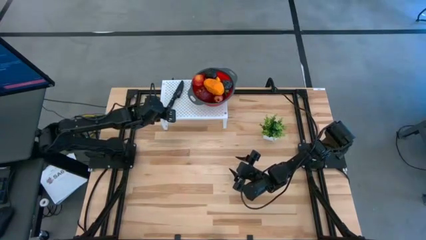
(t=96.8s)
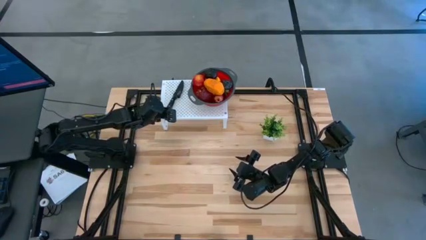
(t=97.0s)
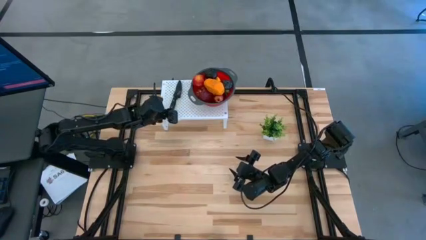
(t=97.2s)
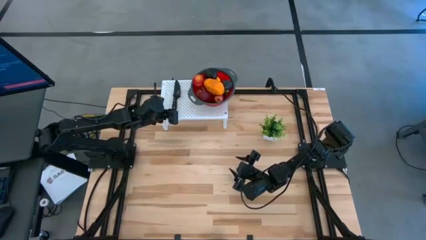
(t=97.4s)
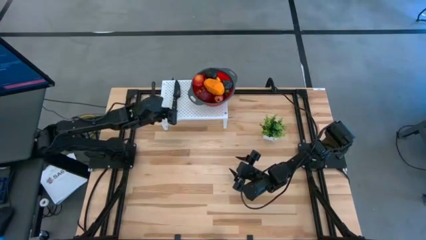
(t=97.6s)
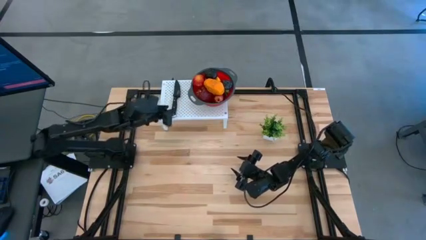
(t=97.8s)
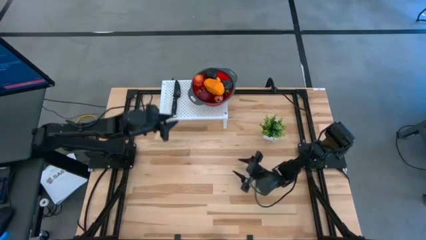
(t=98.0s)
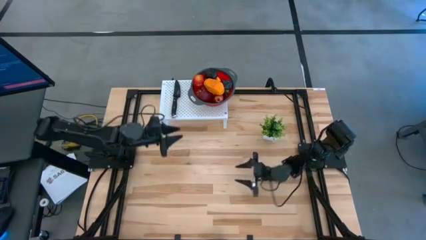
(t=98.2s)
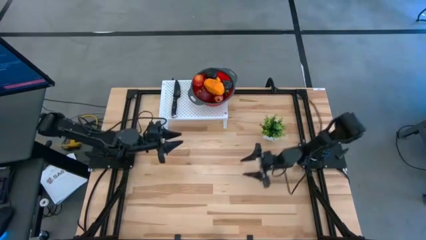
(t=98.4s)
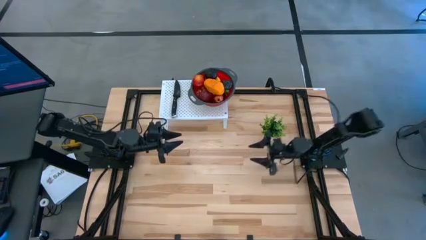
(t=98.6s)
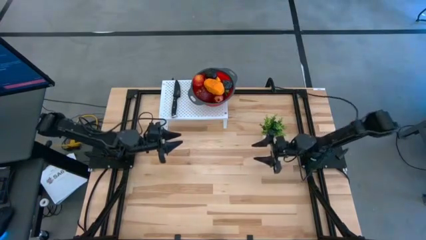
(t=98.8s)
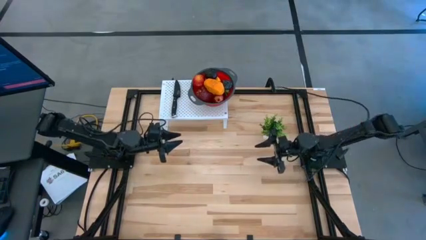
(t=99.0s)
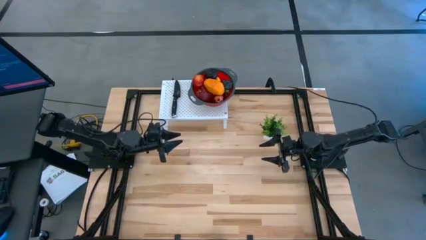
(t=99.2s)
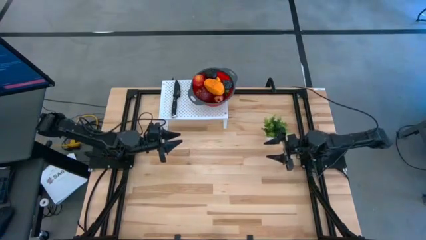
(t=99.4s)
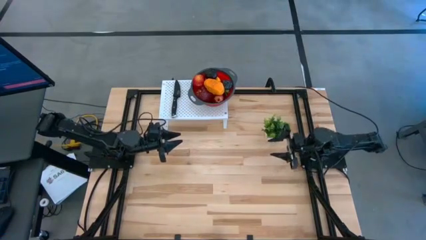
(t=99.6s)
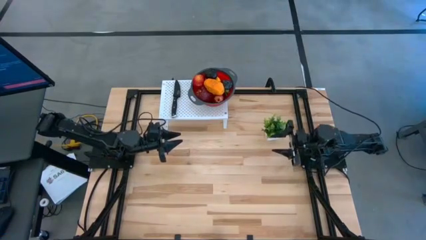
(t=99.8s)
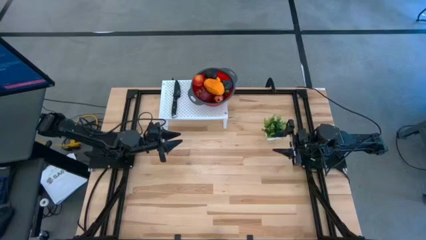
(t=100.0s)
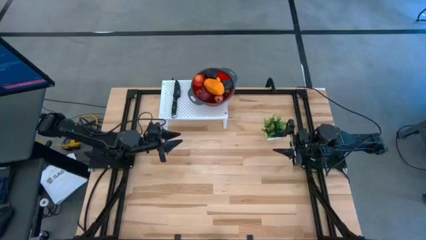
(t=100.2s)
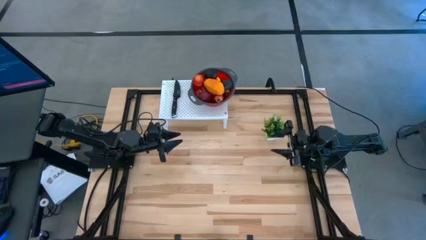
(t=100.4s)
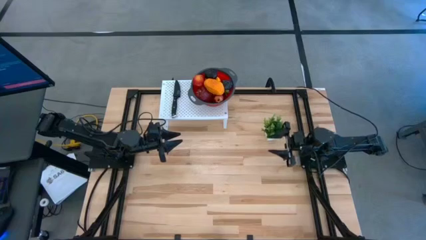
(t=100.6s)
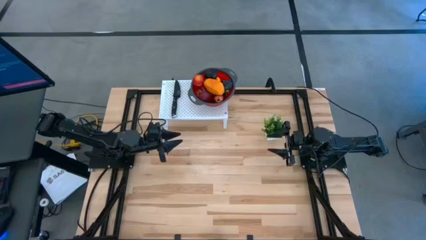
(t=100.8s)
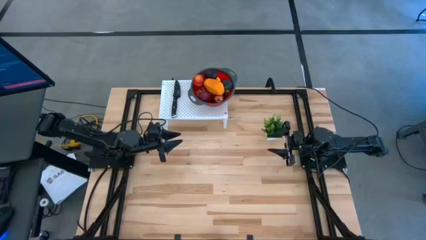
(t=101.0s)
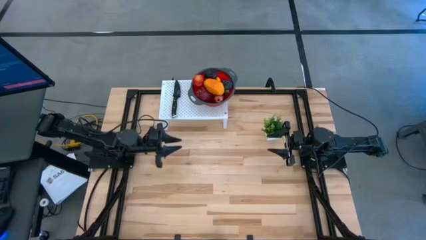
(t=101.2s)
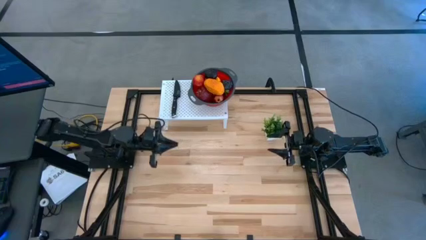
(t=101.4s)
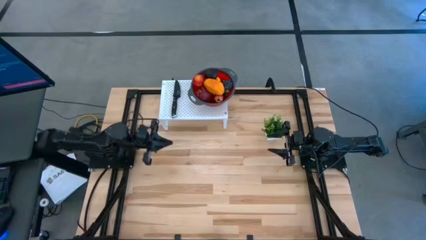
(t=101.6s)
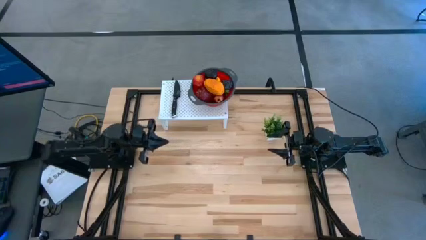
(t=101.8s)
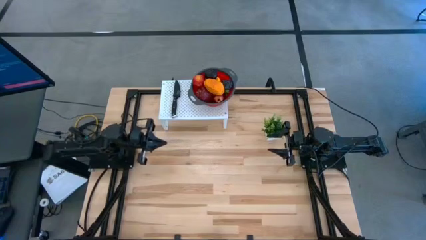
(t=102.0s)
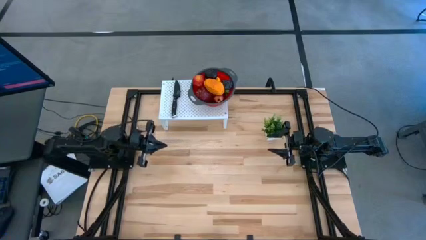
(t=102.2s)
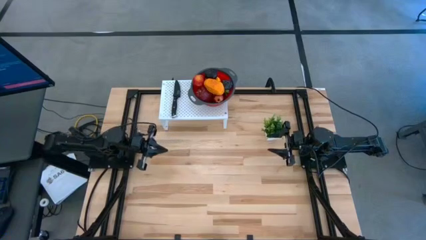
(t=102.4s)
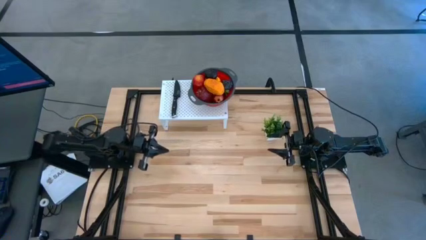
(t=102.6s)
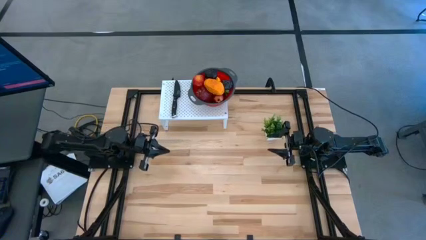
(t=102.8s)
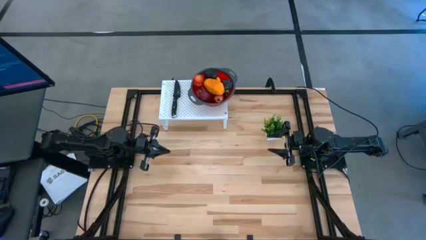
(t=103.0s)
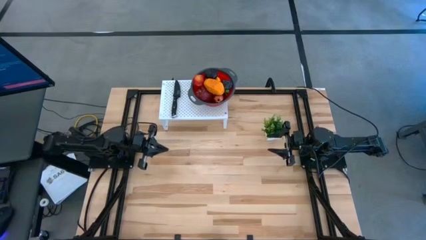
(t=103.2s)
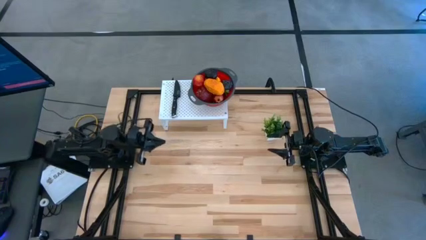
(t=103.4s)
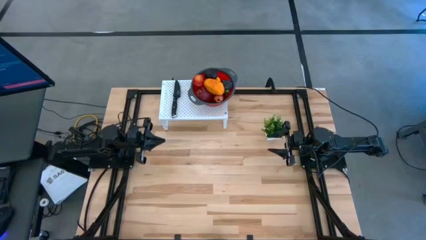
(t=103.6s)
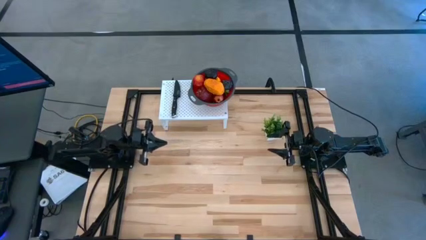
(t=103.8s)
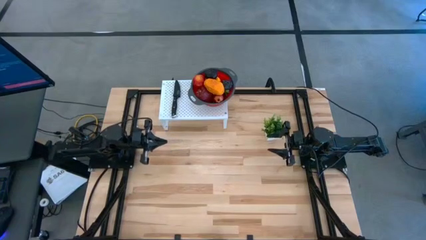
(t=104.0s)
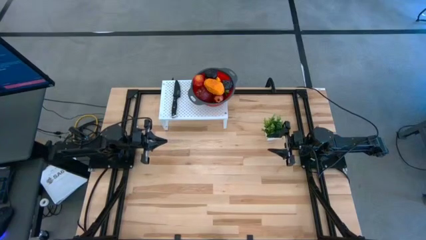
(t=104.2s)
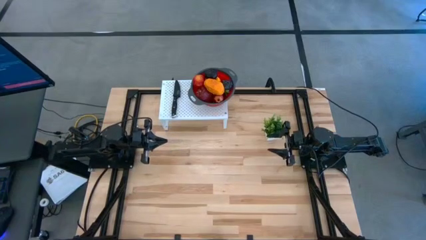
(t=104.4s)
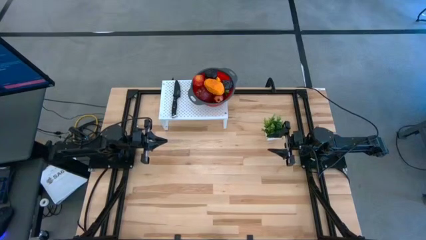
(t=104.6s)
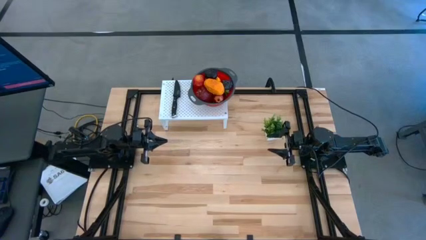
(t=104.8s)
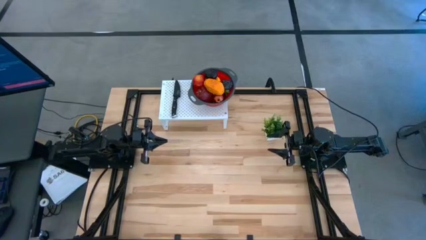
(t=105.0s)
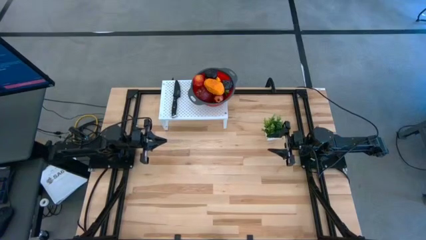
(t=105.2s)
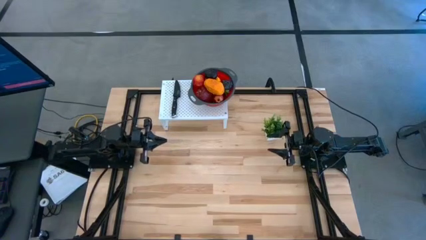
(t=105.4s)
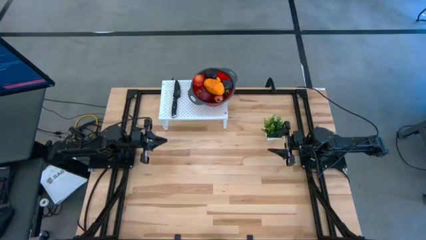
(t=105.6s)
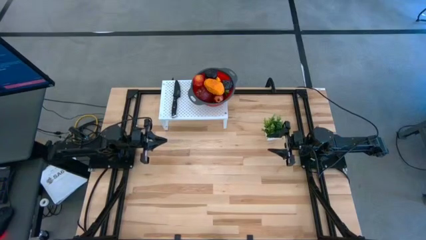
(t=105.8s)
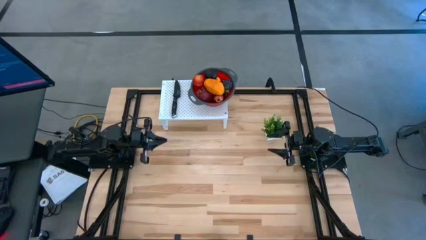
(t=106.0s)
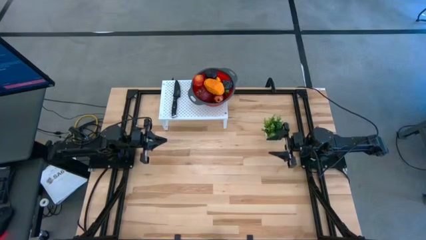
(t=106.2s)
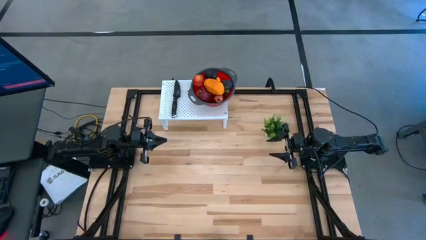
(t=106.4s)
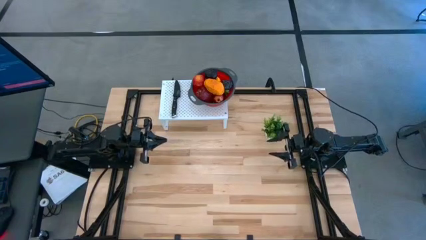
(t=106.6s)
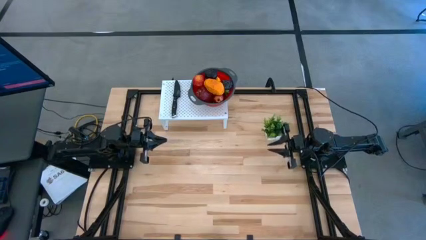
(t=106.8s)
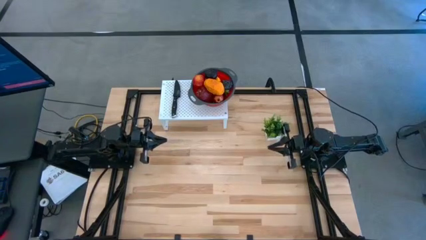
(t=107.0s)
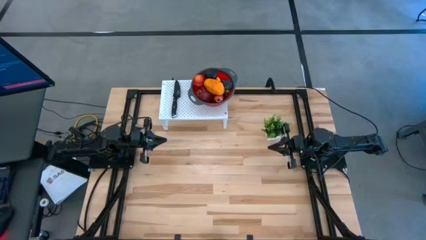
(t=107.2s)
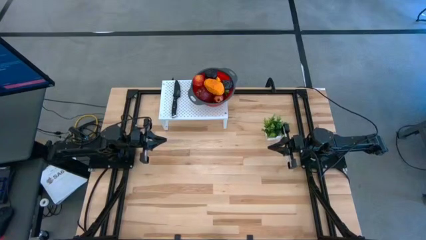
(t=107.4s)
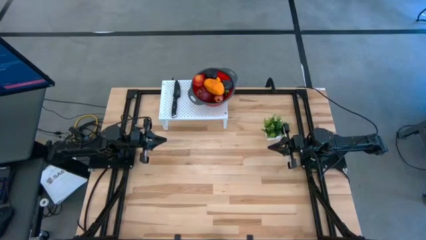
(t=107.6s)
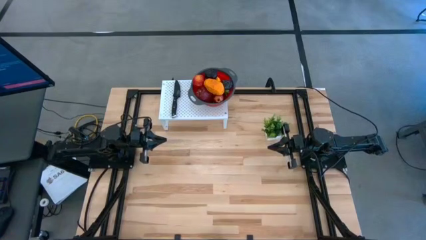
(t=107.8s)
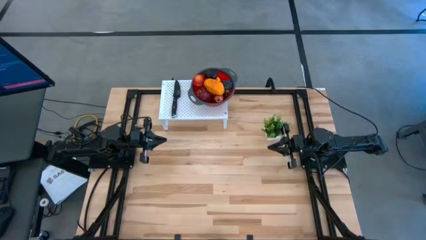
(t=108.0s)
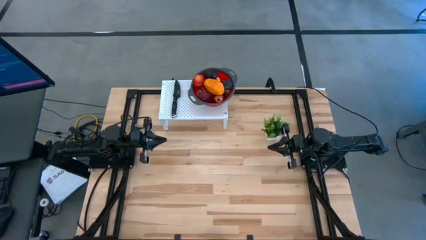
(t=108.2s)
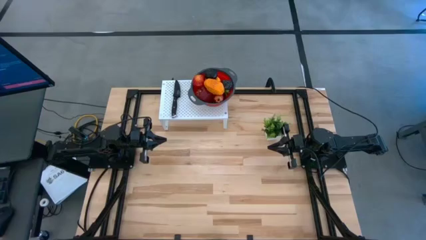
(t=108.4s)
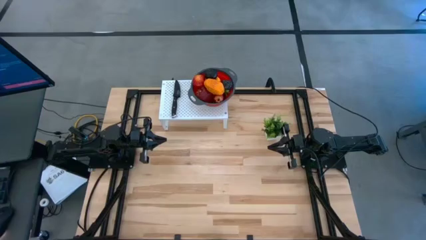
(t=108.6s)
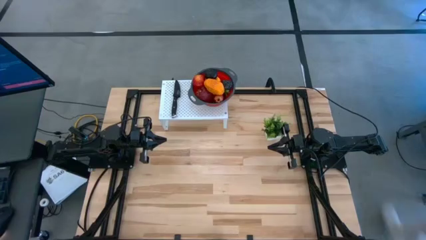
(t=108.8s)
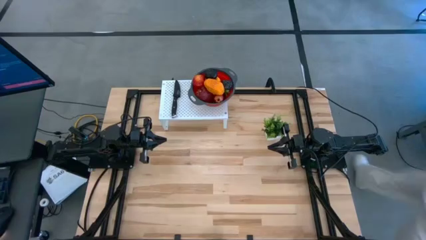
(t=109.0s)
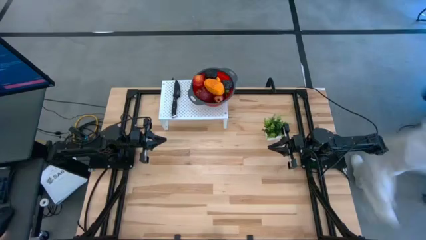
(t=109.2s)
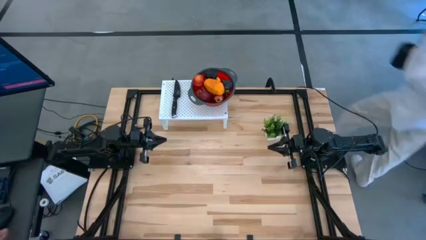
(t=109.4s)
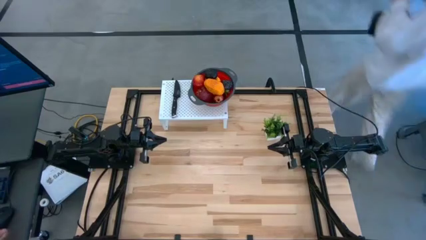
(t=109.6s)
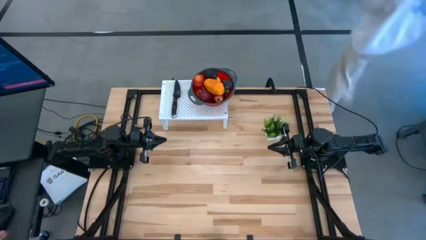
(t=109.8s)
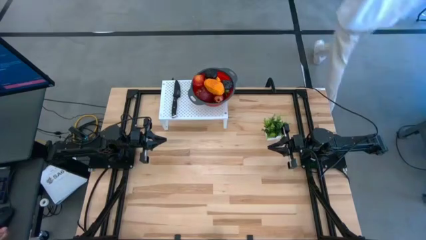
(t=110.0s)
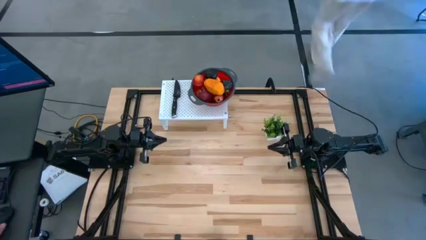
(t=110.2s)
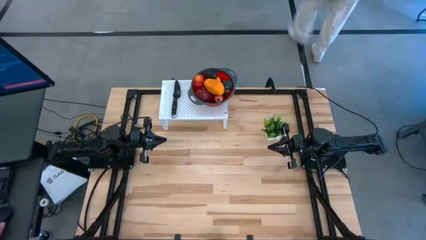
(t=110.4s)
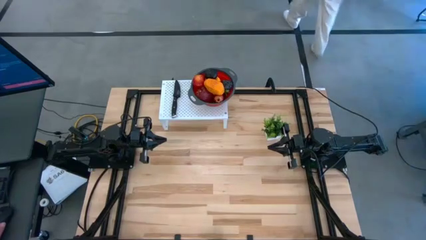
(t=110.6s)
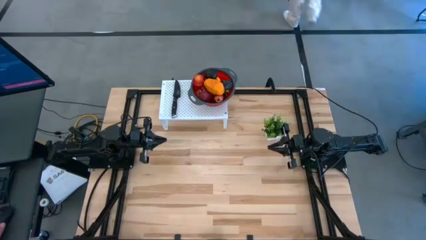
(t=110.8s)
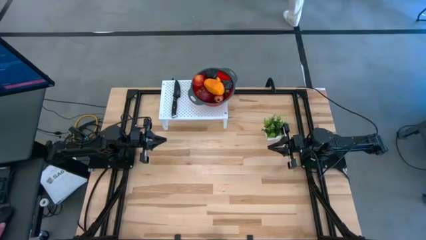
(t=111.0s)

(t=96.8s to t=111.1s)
Task: Pick & Place Fruit
Return to Home Position

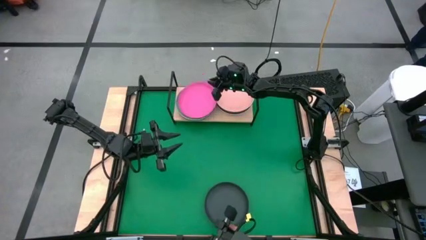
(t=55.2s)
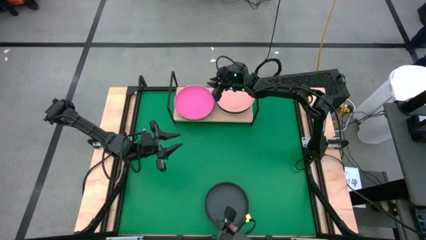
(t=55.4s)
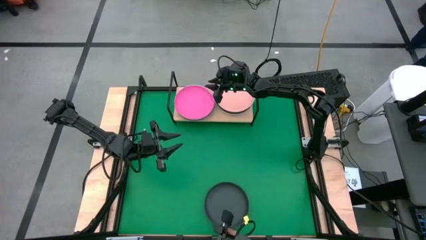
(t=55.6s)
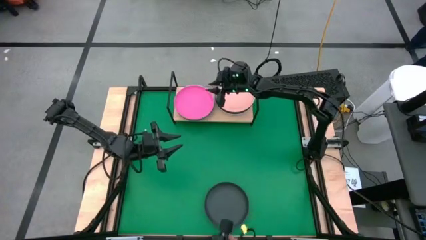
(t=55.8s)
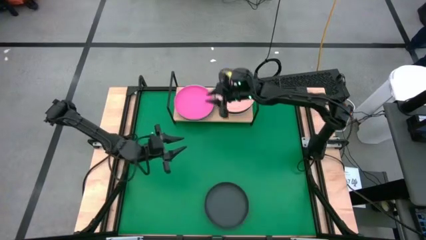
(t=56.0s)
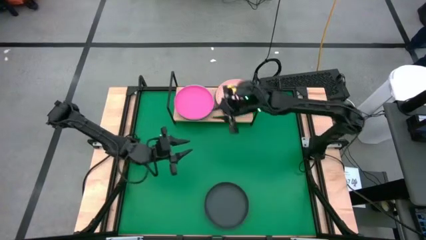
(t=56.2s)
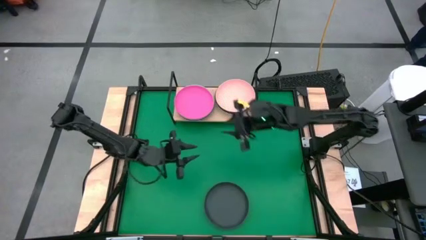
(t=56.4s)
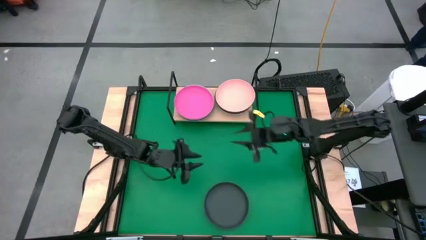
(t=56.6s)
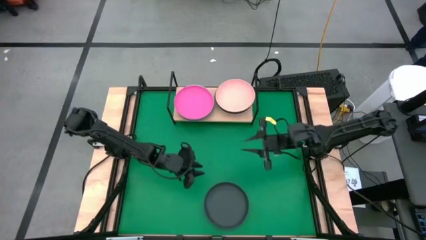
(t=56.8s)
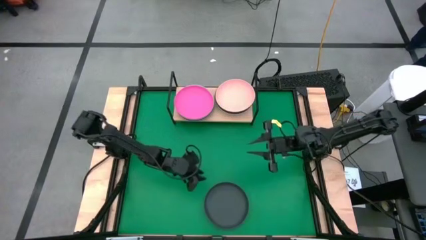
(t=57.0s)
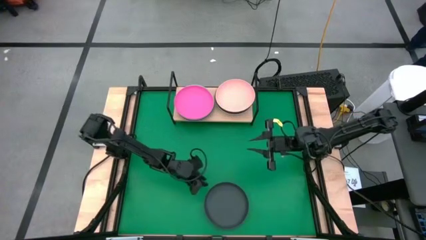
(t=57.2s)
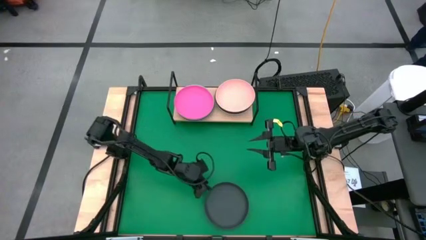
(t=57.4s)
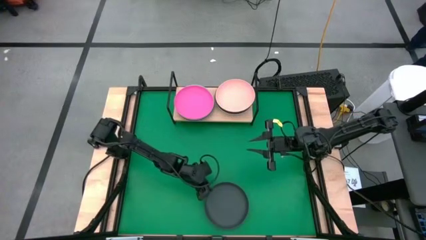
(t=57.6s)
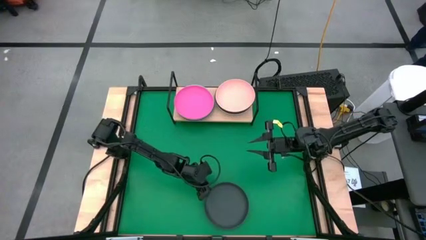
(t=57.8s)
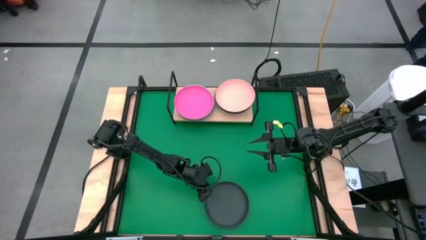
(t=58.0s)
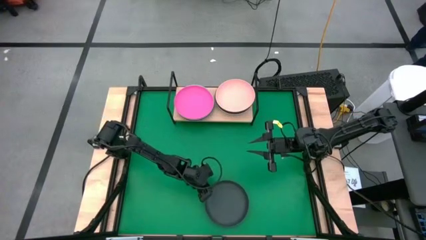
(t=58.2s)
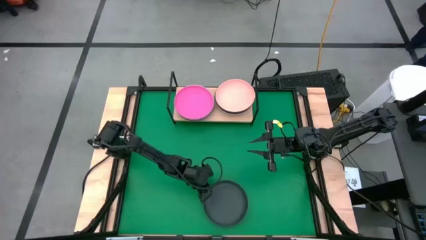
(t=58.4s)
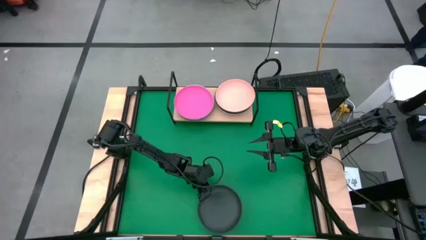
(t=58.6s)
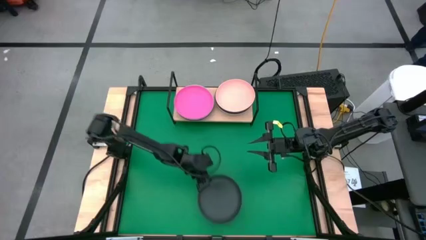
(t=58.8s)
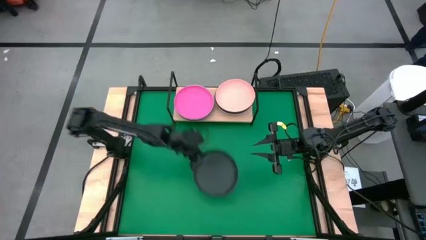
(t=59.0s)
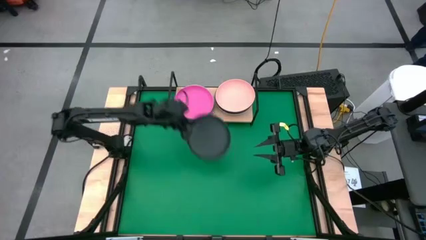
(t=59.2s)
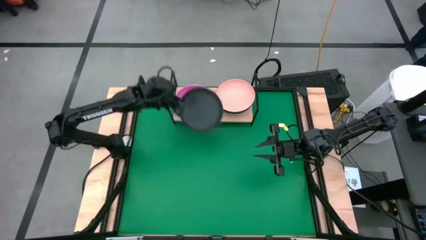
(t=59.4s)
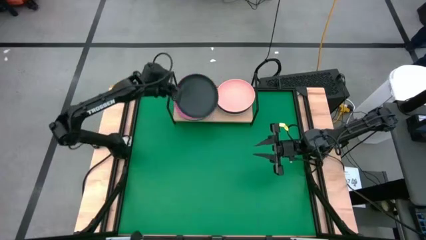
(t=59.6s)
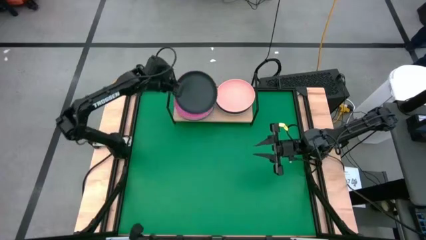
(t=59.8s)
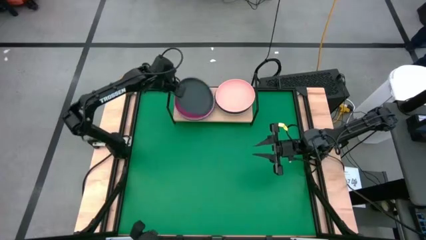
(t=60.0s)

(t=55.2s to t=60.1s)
Task: Place and stack plates onto a shelf
Stack the black plate on top of the pink plate on the shelf
